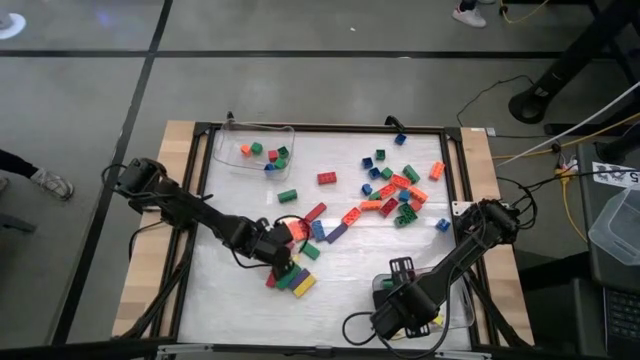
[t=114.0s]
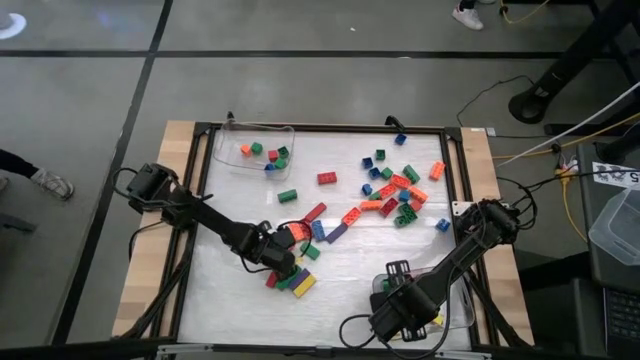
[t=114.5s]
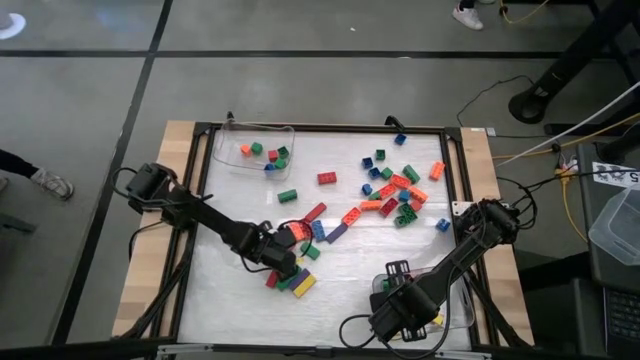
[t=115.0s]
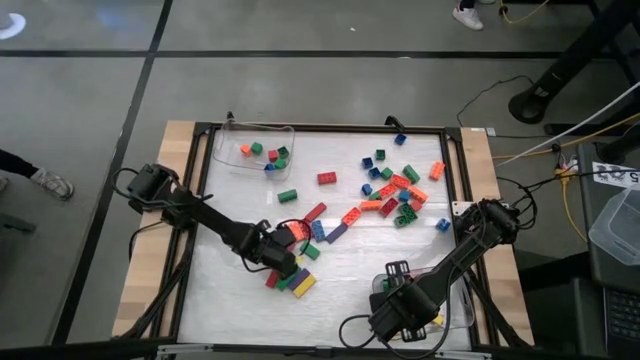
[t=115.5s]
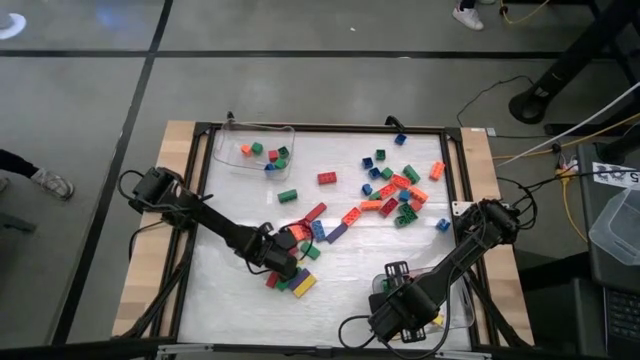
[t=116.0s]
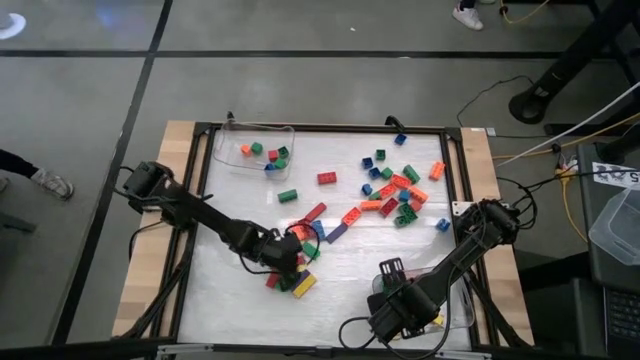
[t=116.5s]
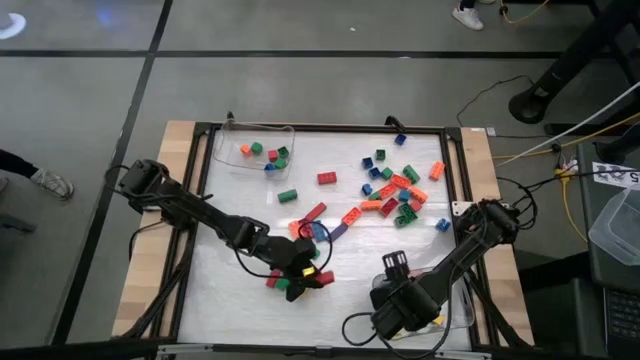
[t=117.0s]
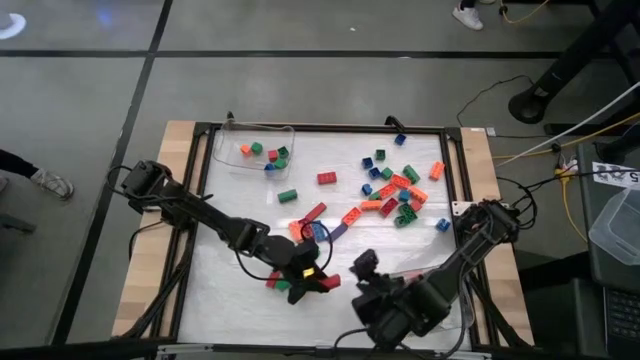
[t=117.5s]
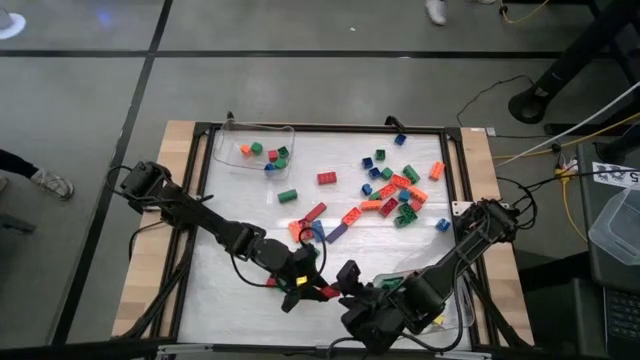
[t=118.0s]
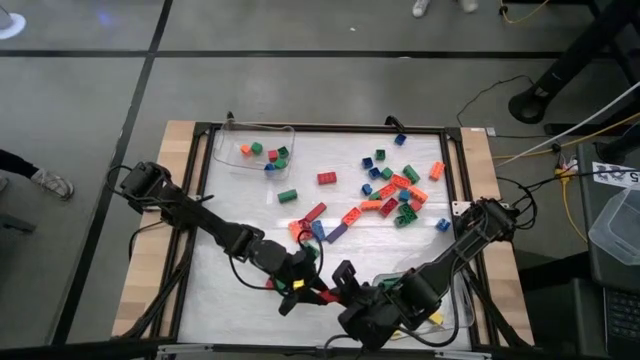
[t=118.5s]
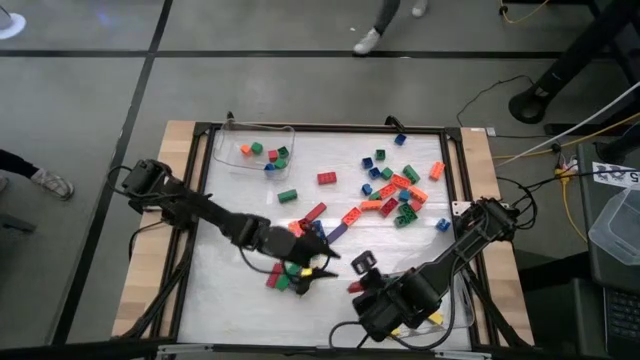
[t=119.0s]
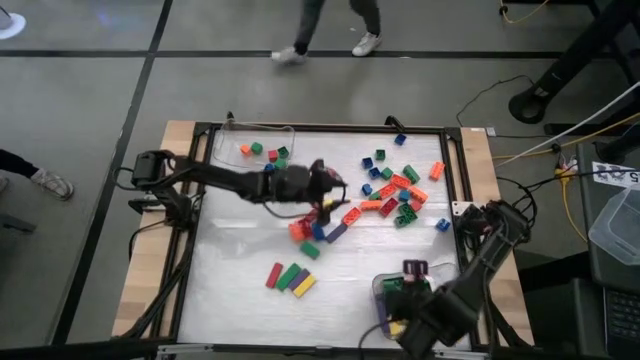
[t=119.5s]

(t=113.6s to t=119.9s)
Task: Sort blocks by size
Put the rectangular red block into the bottom transparent bin

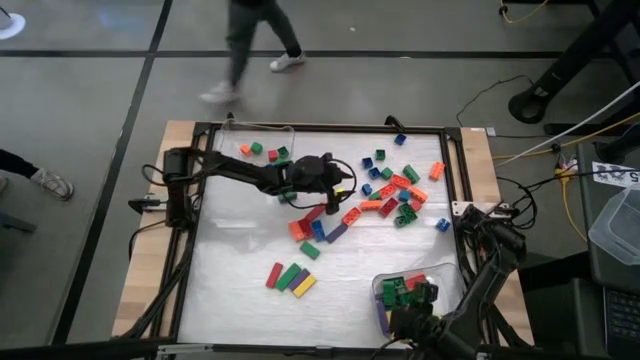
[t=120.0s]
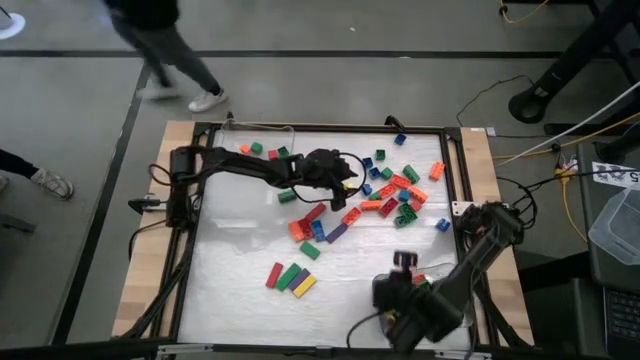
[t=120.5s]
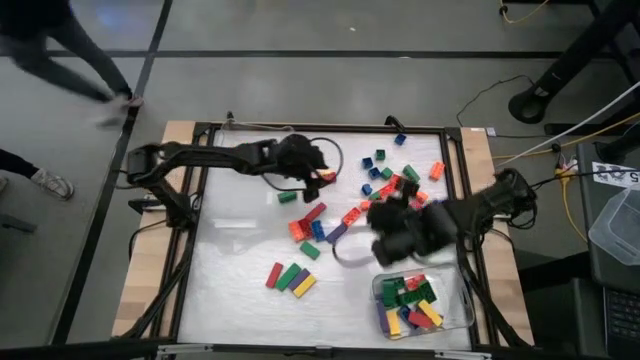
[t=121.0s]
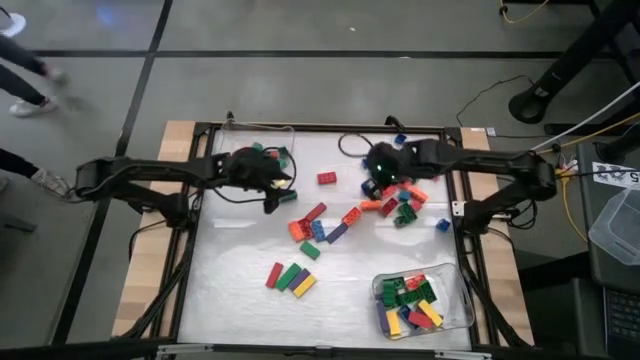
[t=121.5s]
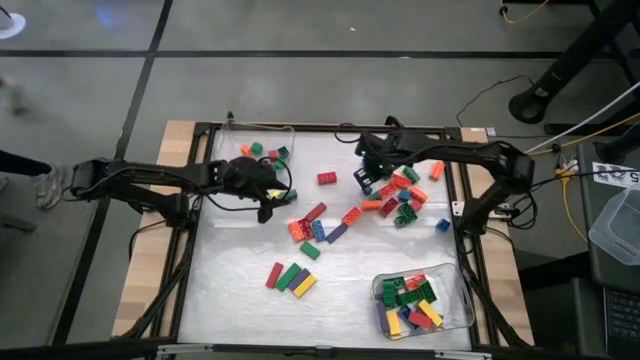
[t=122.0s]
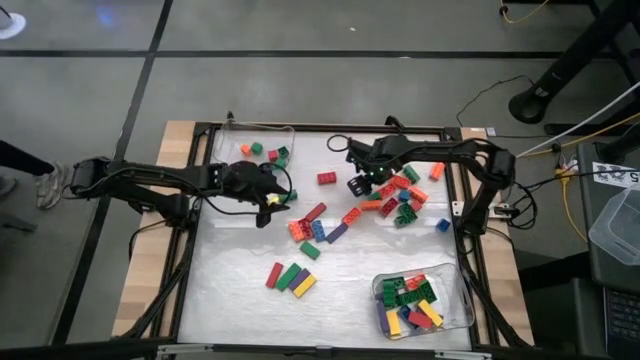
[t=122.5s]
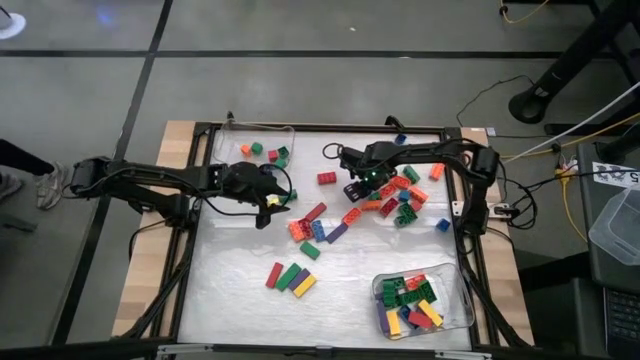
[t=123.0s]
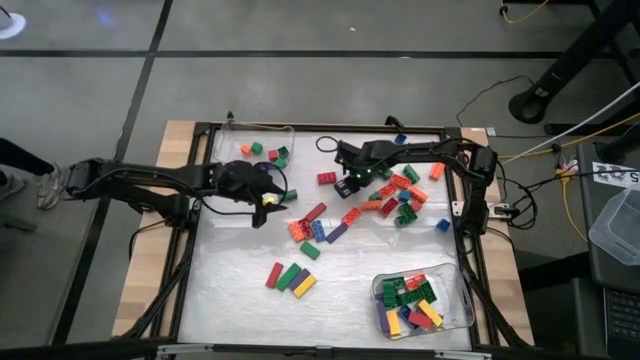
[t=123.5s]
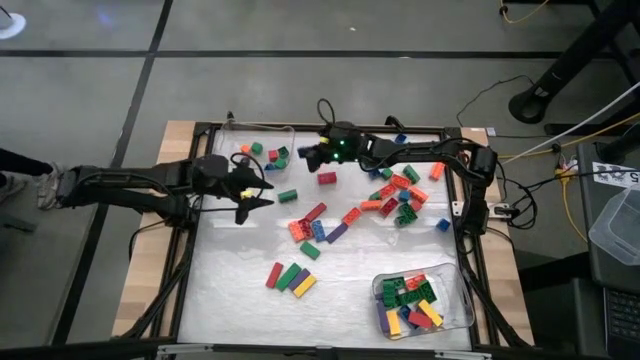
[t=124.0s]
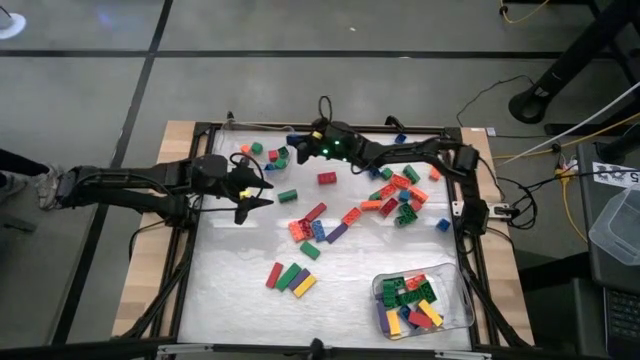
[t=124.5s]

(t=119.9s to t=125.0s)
Put the square blue game piece into the top transparent bin

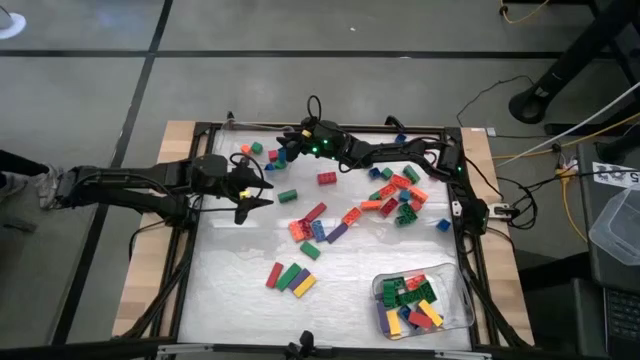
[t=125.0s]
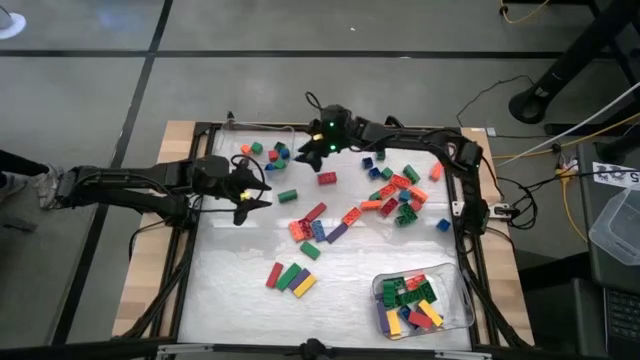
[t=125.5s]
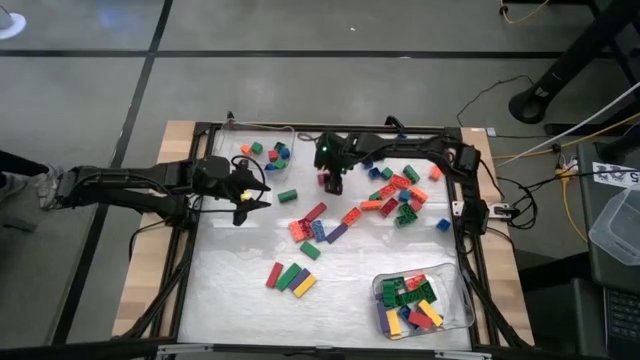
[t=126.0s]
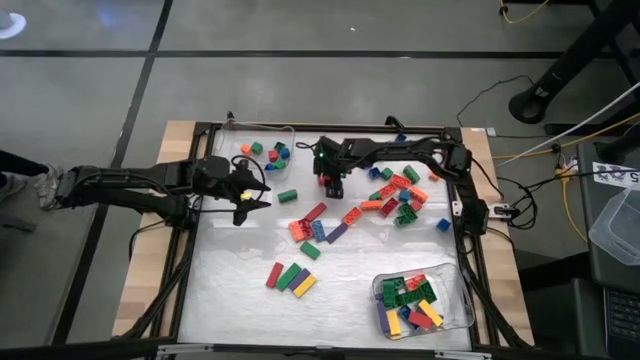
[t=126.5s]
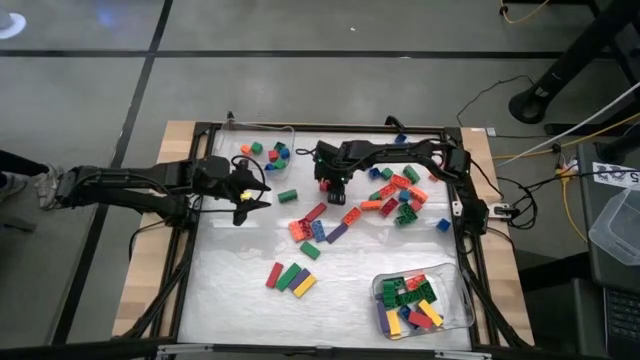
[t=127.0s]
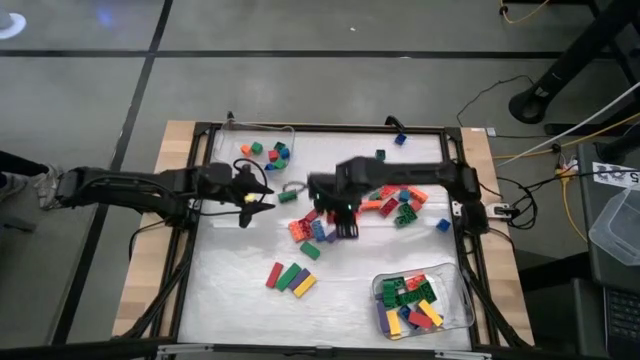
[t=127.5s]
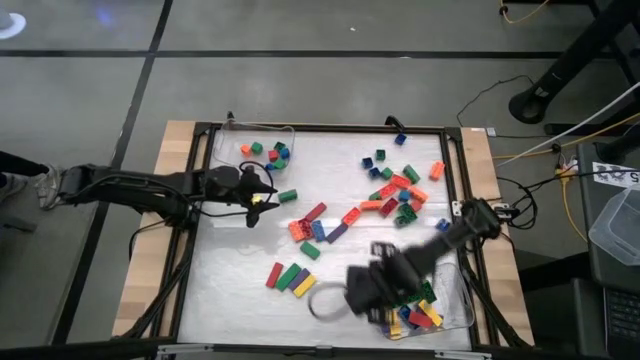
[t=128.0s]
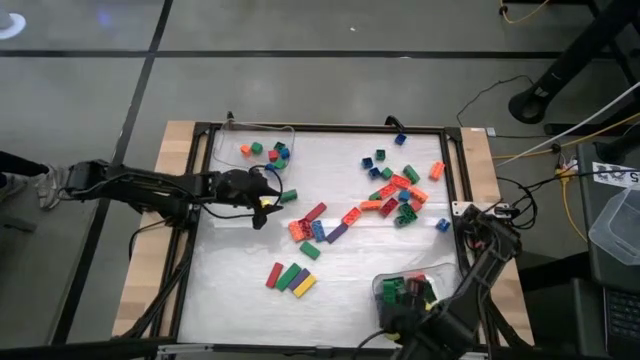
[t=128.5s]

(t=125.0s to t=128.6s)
Put the rectangular red game piece into the bottom transparent bin

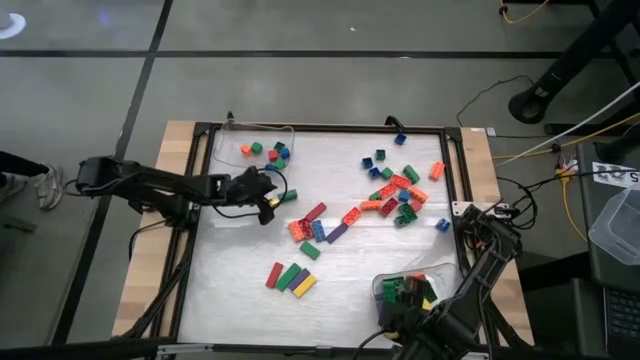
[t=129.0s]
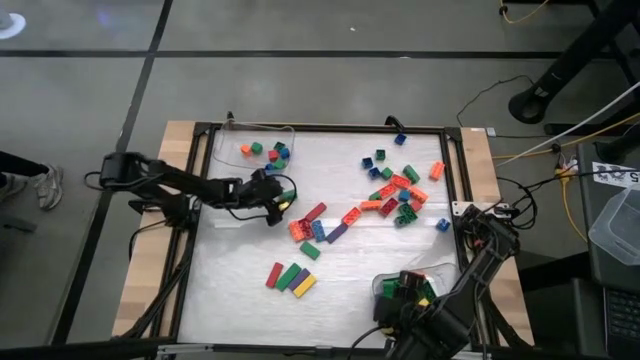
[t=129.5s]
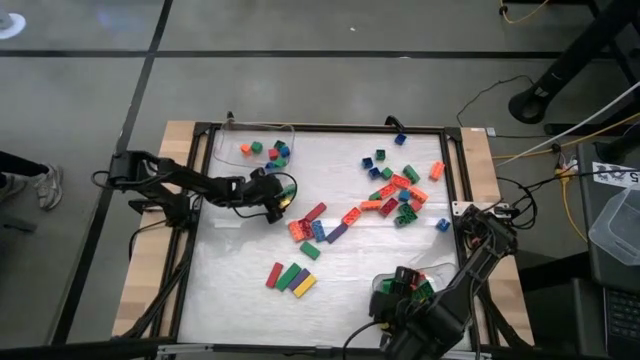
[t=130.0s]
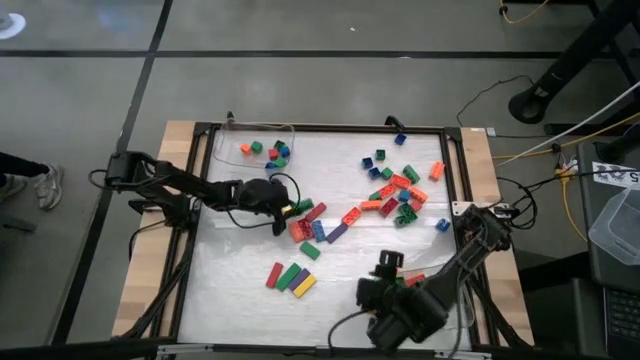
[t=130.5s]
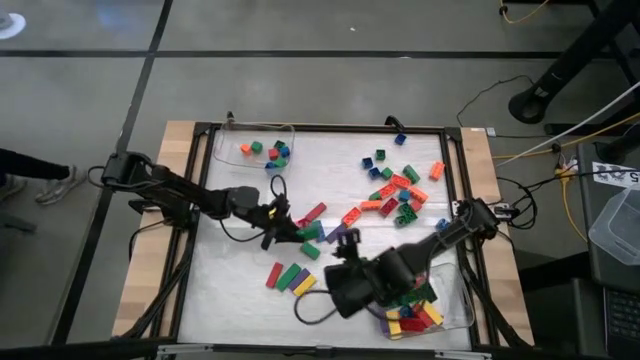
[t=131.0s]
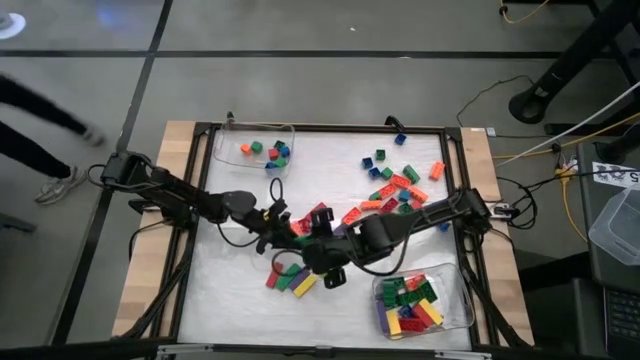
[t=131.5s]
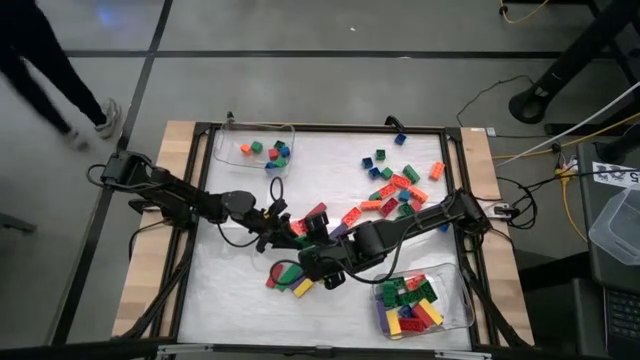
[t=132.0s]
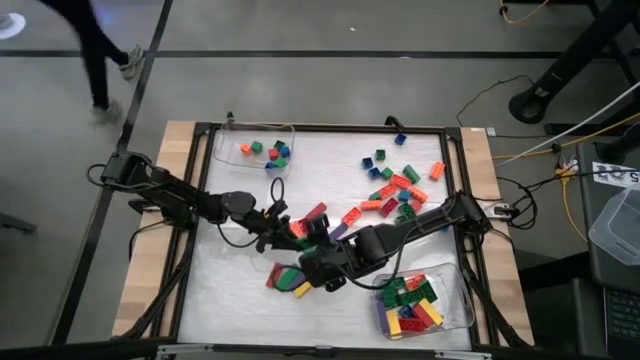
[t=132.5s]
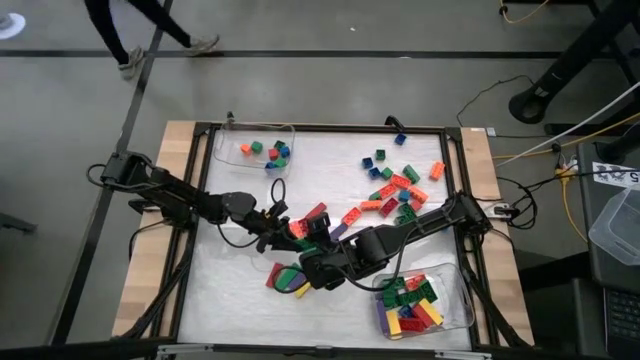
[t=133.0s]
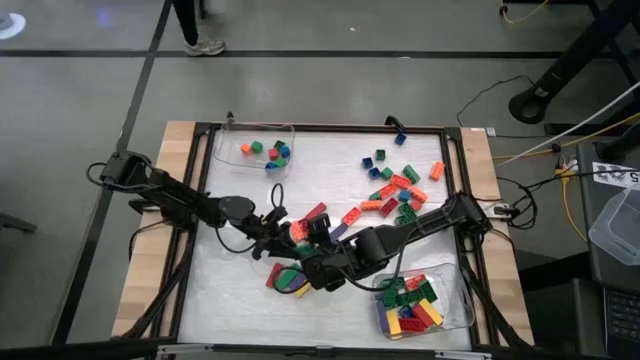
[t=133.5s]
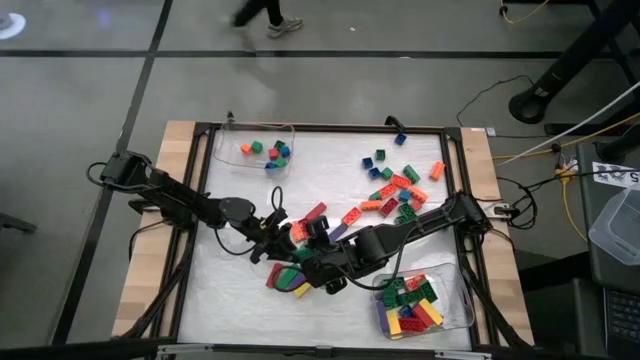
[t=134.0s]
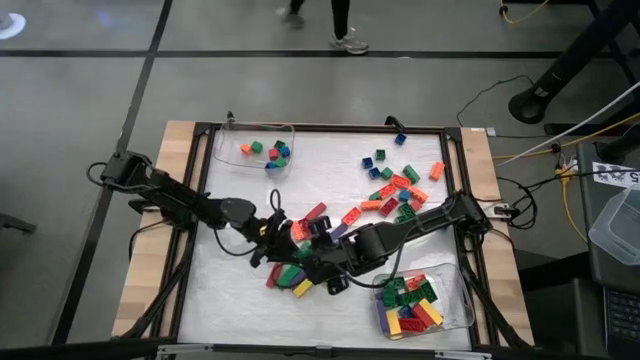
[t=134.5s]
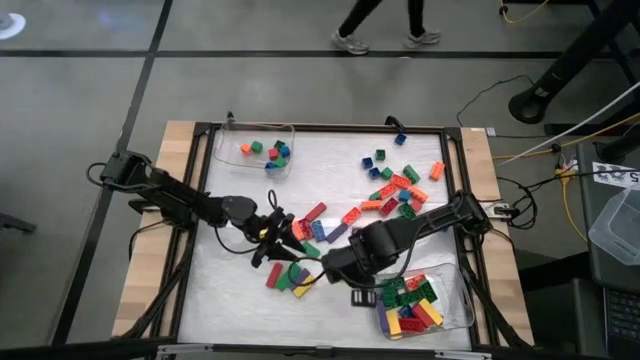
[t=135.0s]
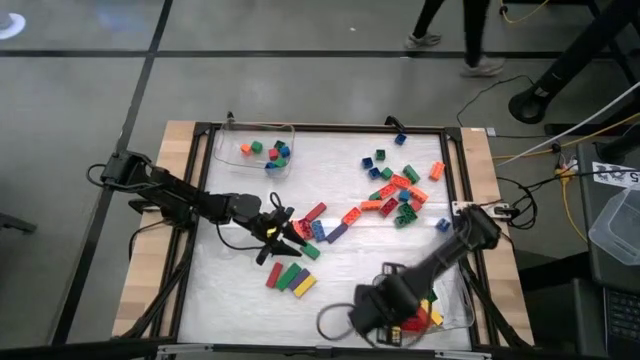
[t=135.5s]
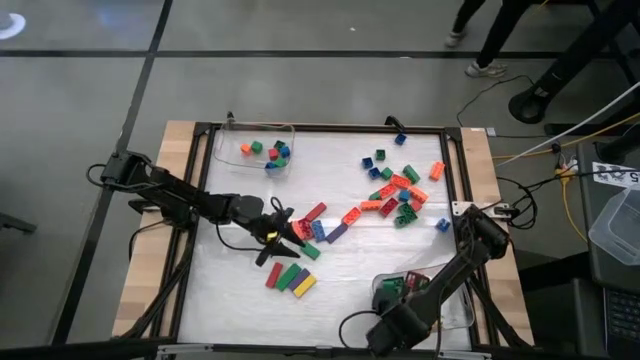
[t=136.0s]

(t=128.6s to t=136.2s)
Put the rectangular green game piece into the bottom transparent bin
